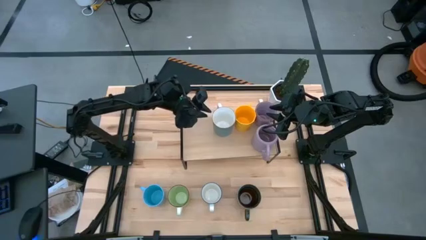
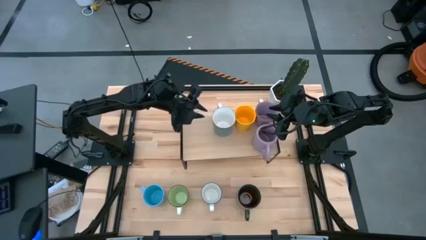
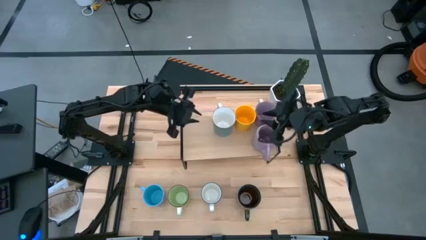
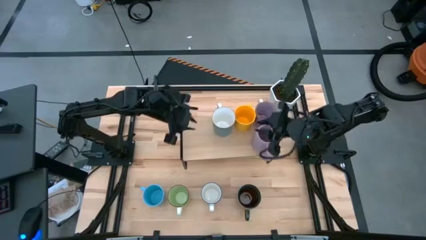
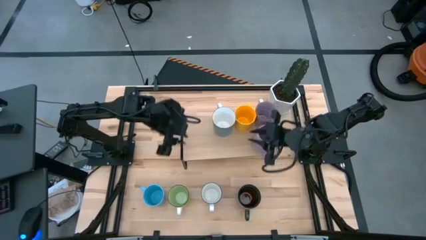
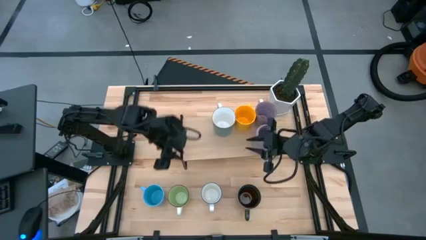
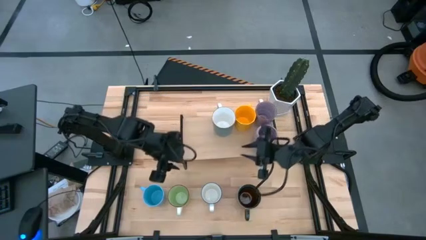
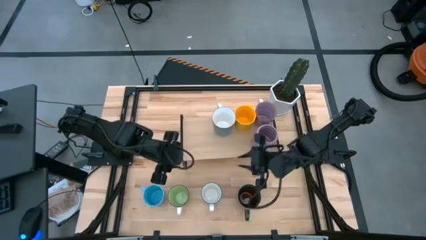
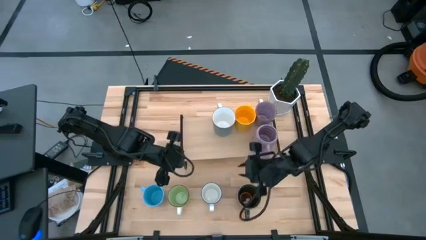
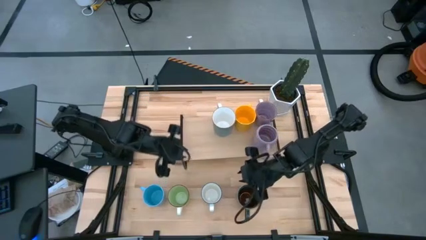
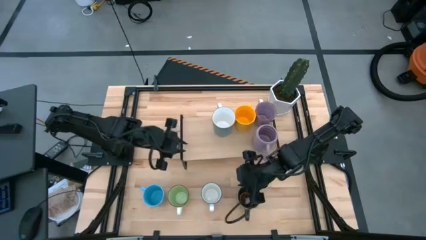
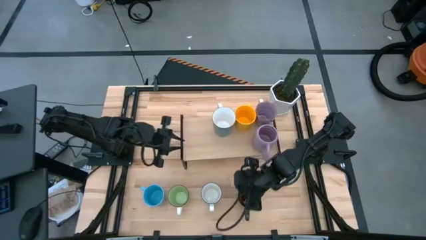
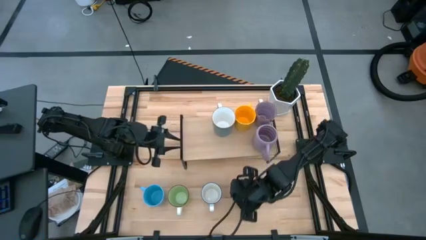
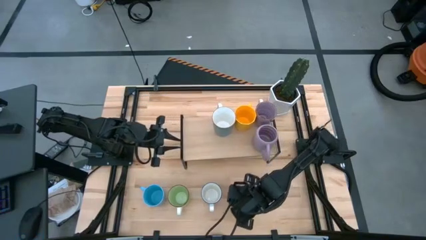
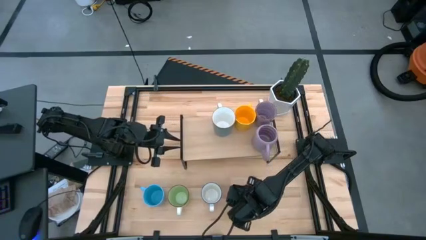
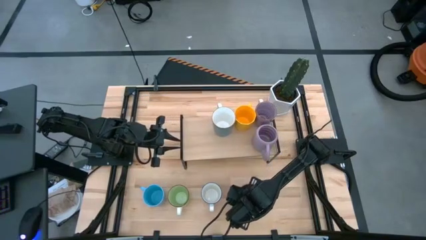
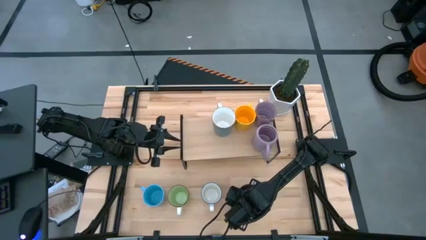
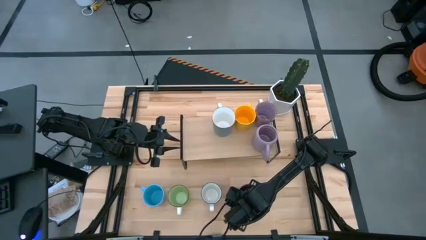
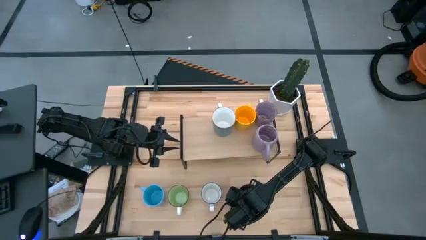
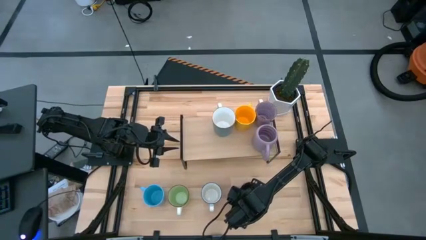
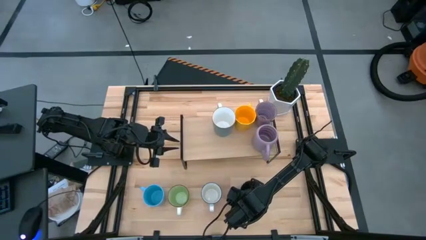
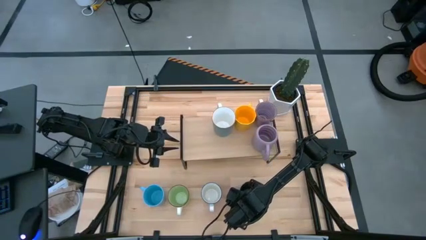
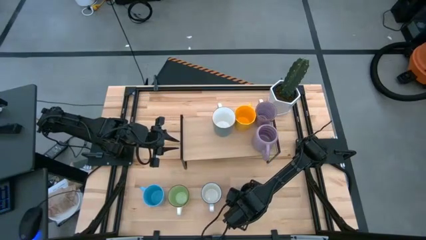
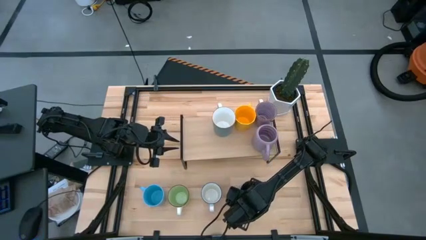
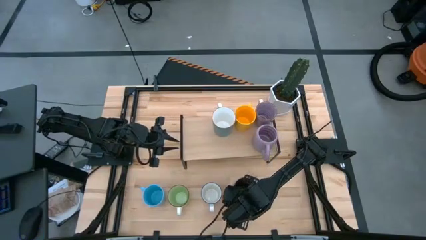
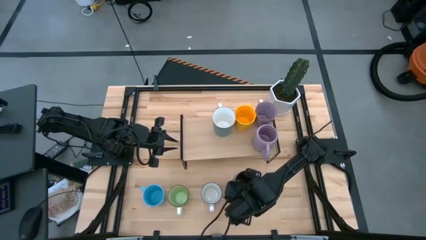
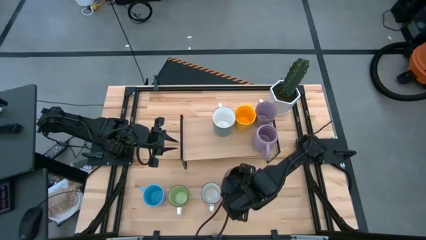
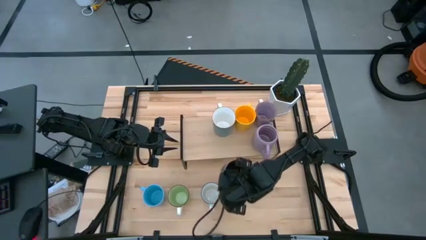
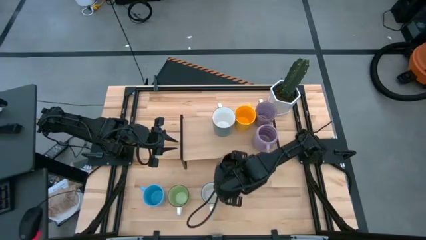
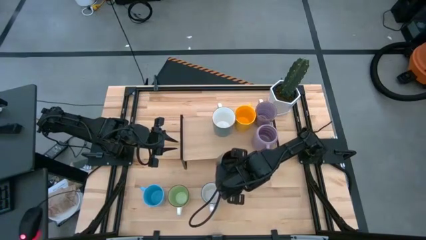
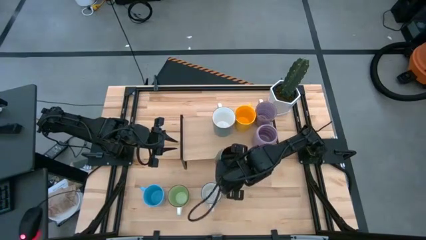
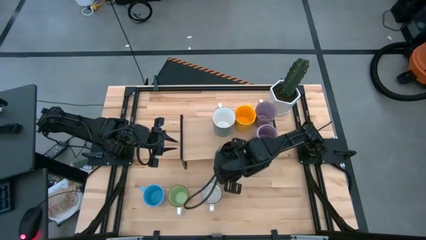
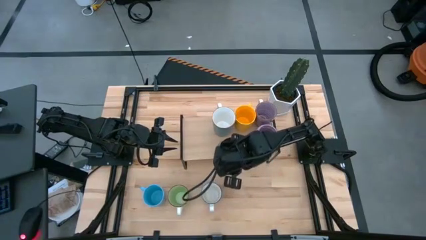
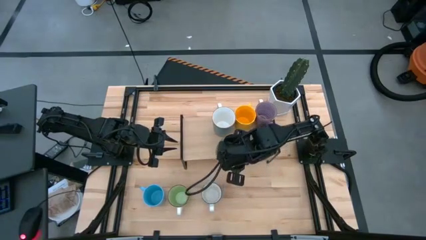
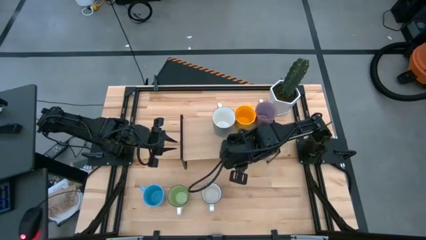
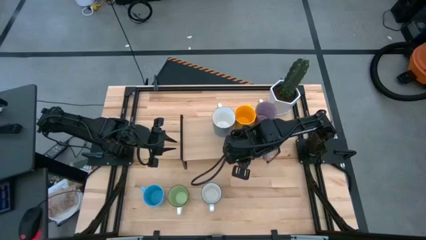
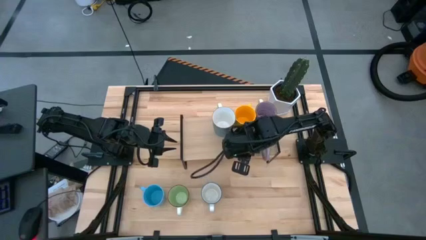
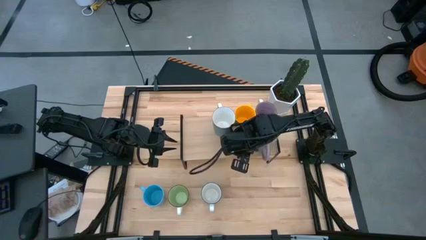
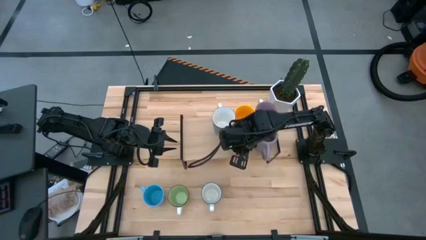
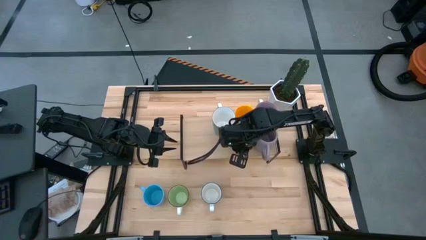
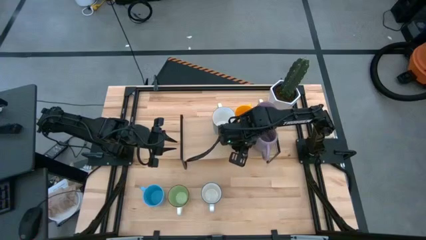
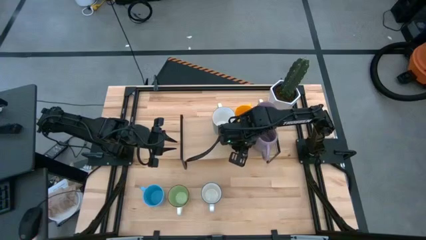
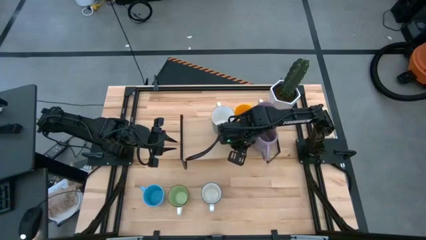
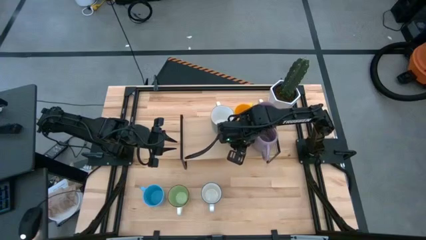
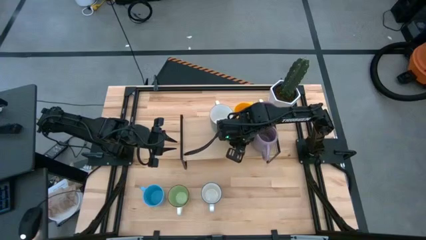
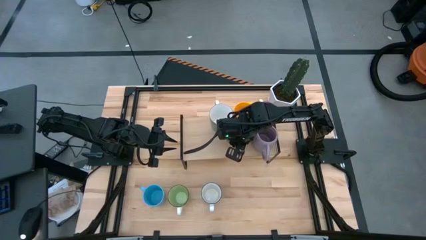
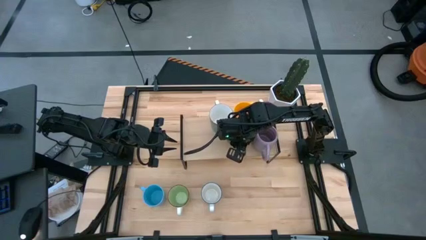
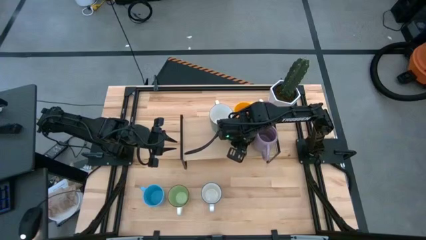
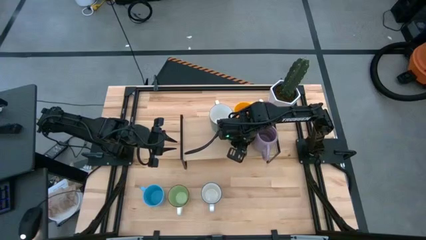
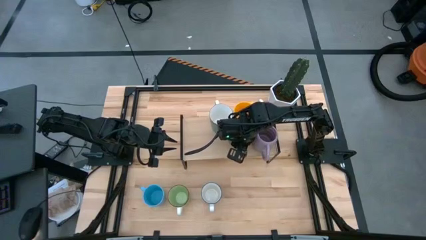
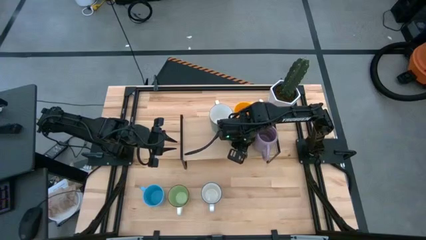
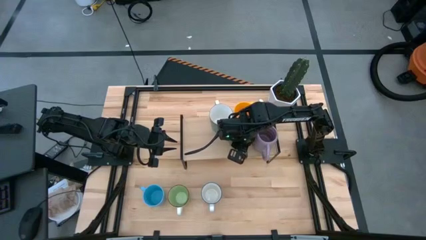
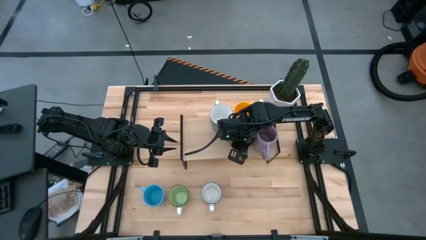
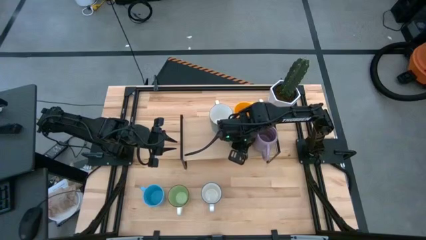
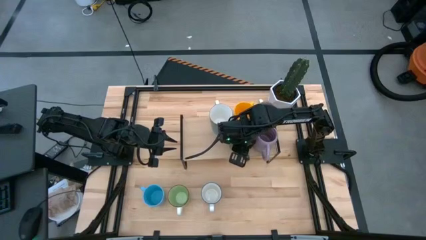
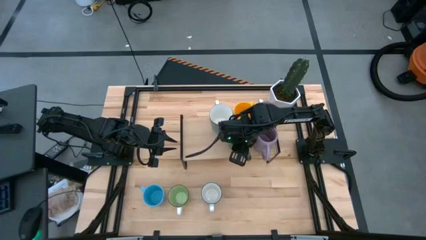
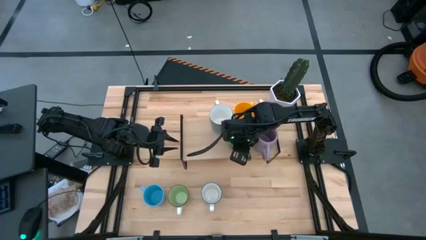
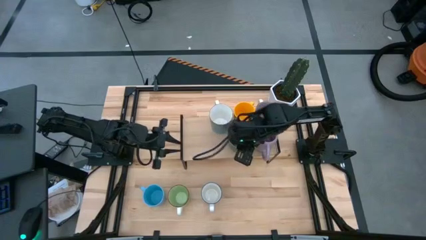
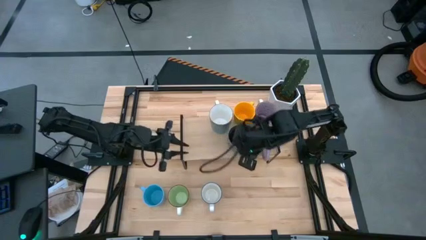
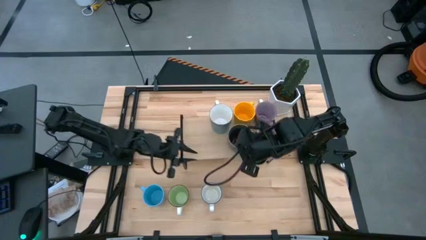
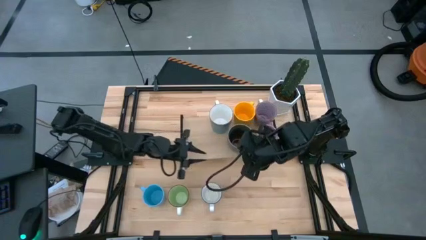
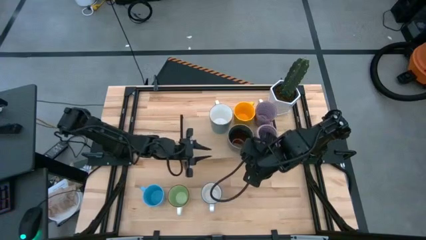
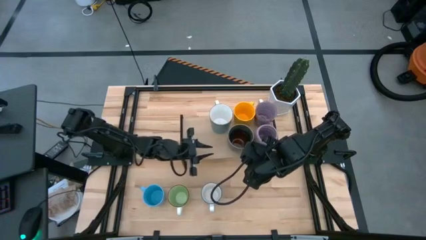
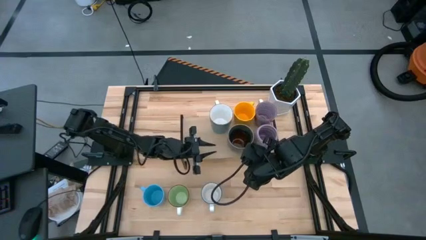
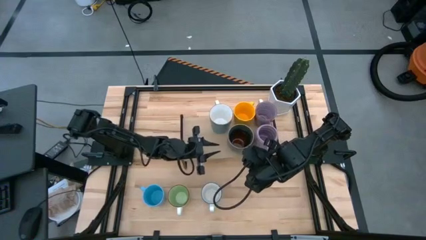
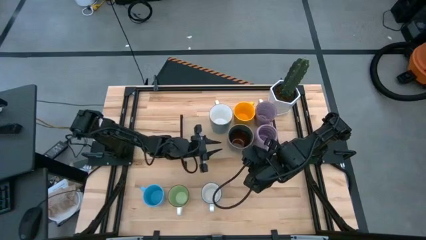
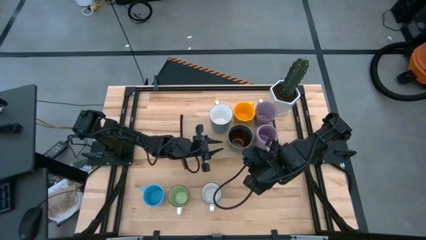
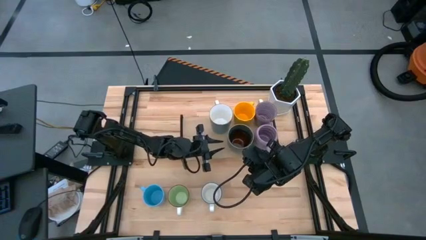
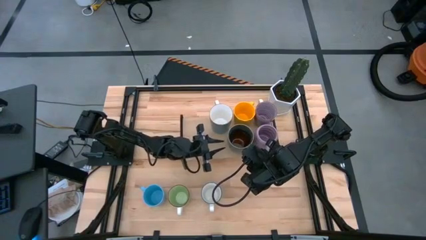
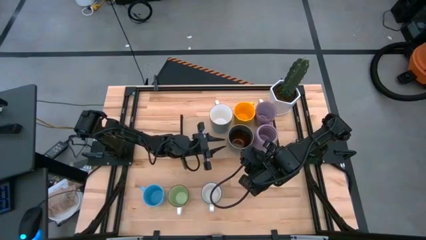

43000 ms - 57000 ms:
Task: Place coffee mugs
Put the brown mug on the shelf
